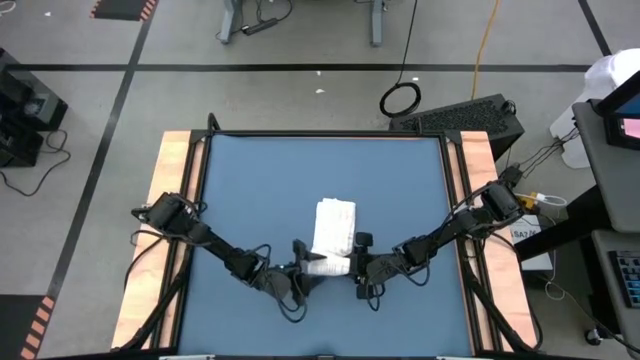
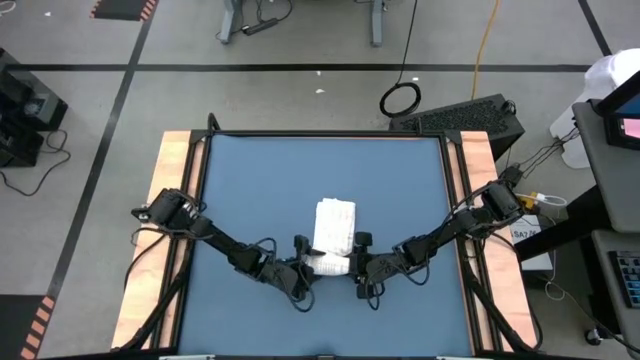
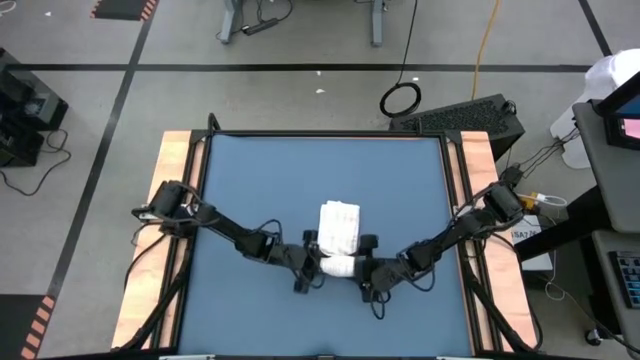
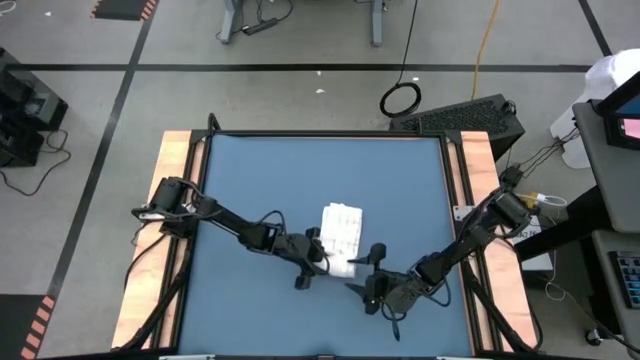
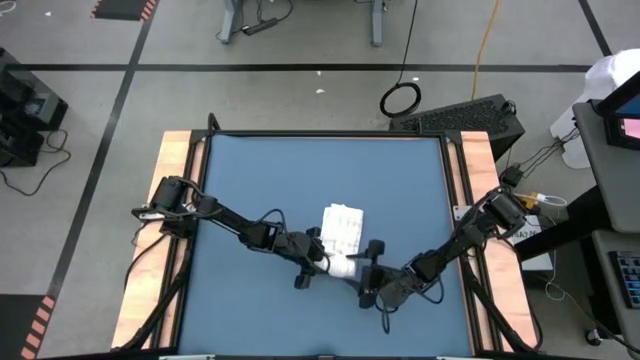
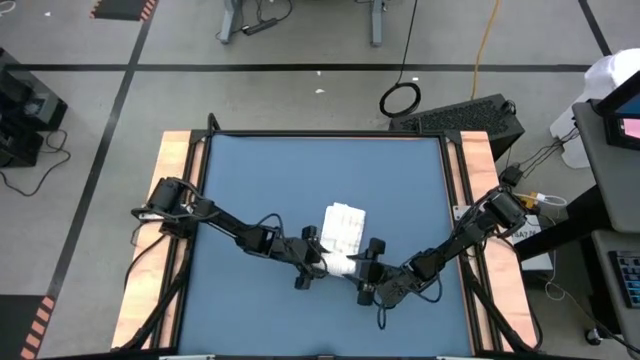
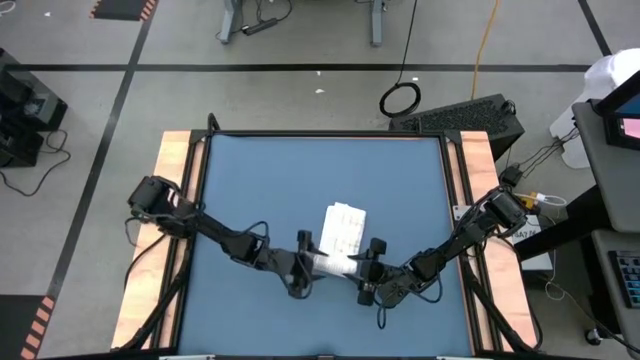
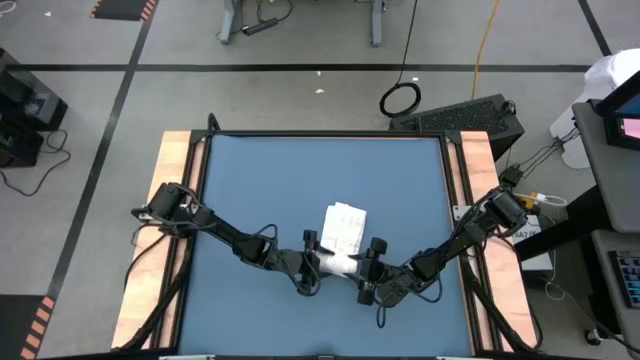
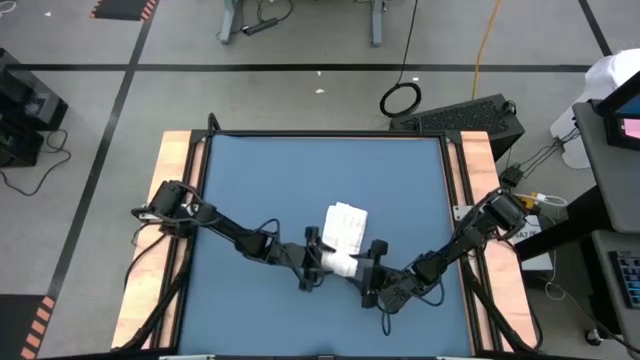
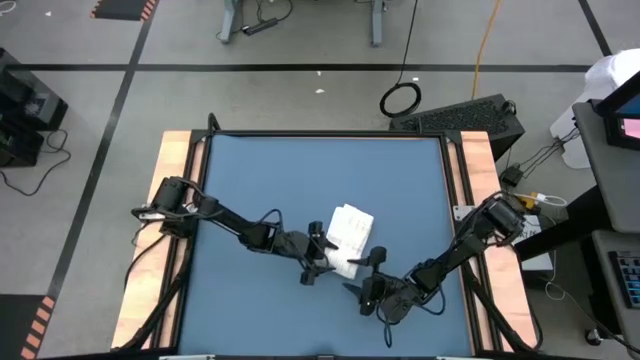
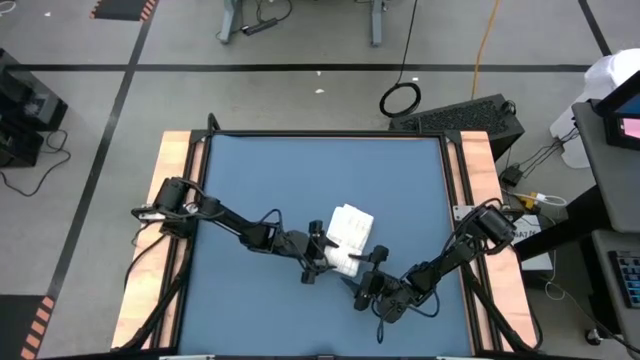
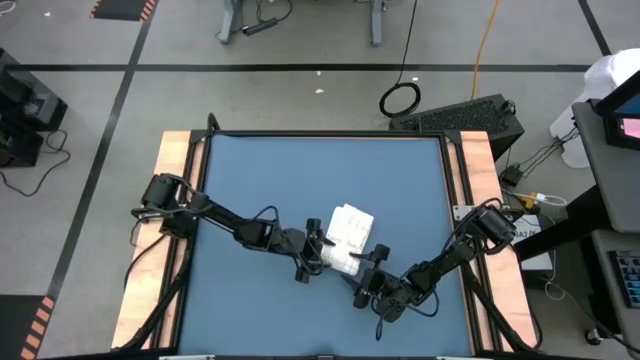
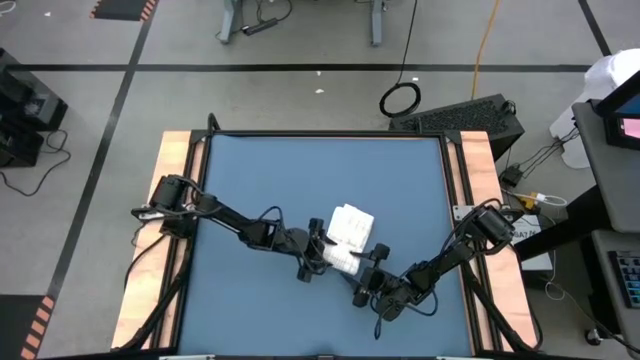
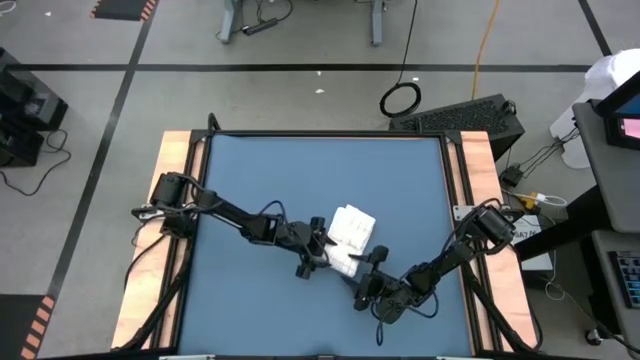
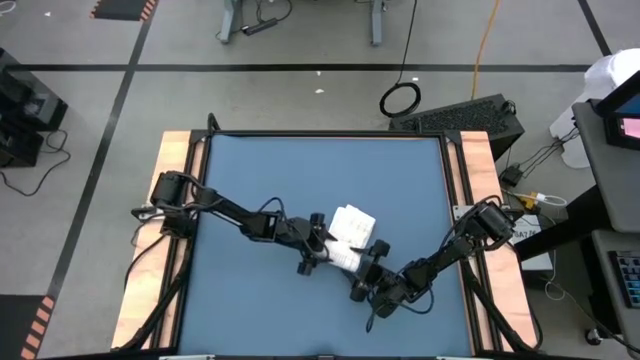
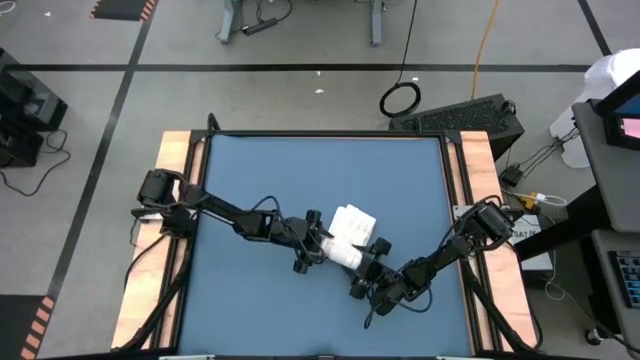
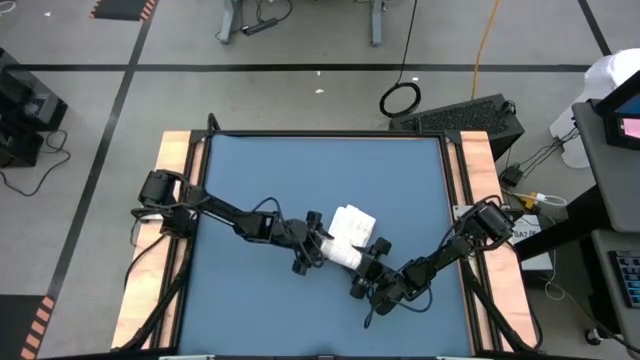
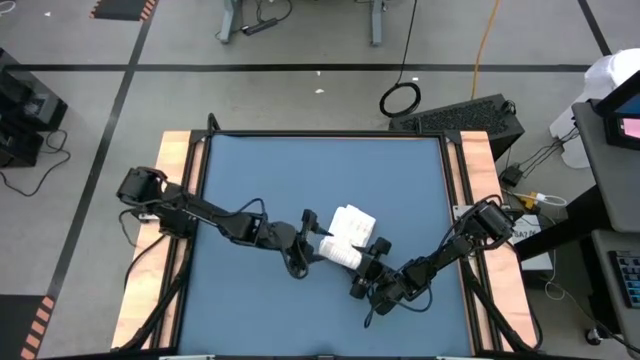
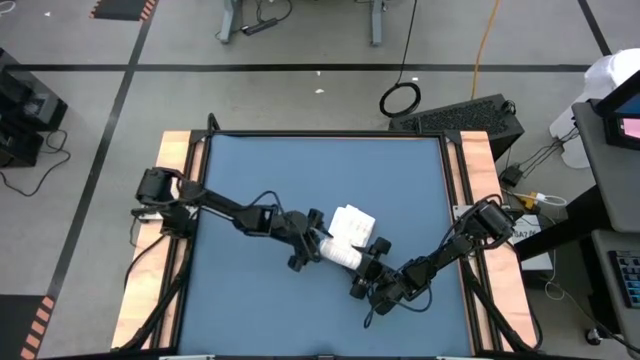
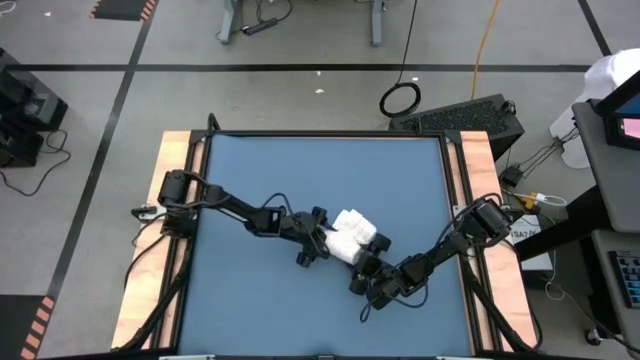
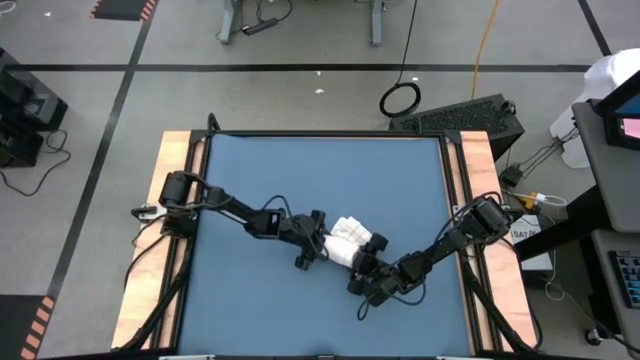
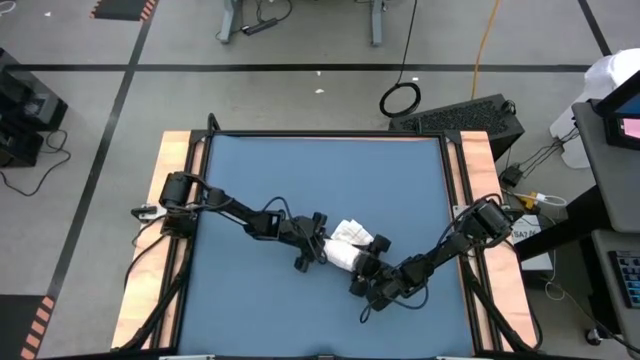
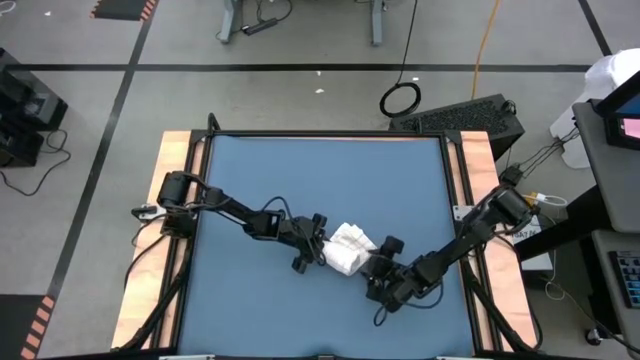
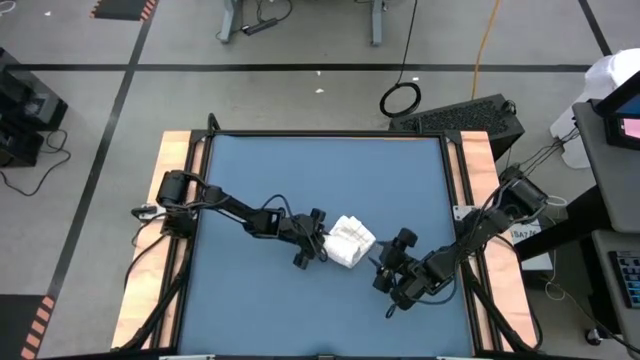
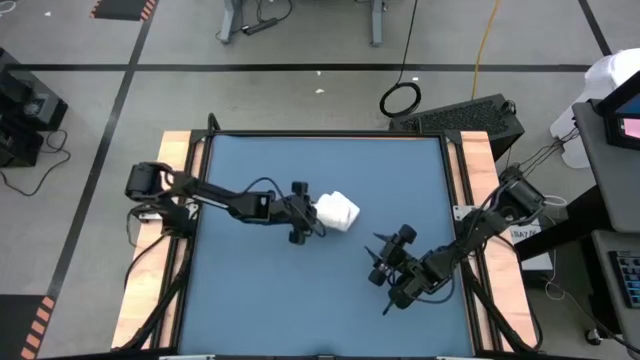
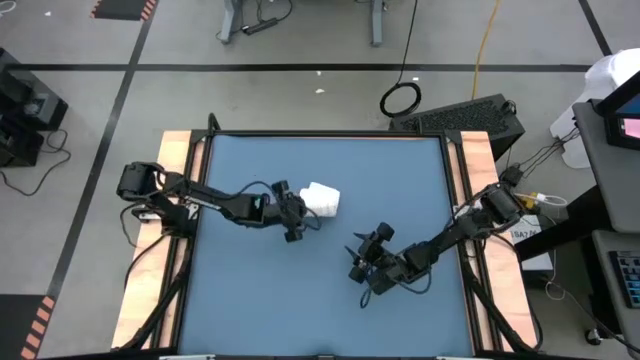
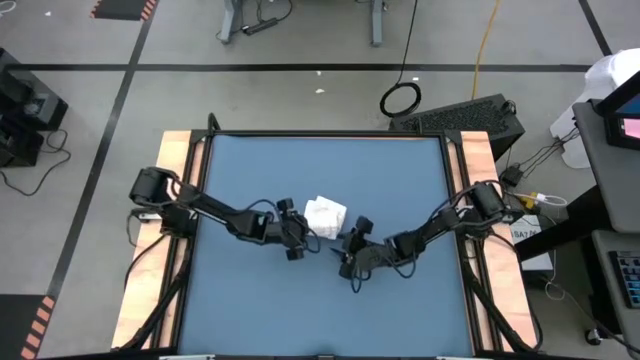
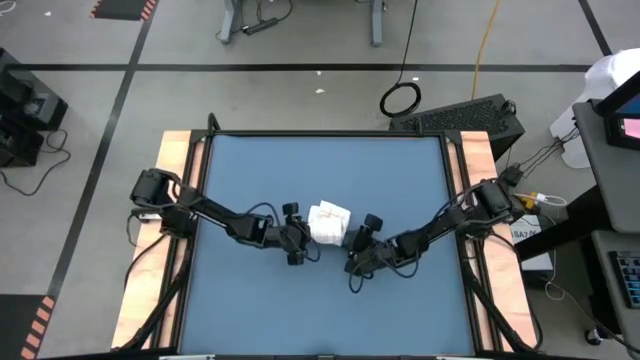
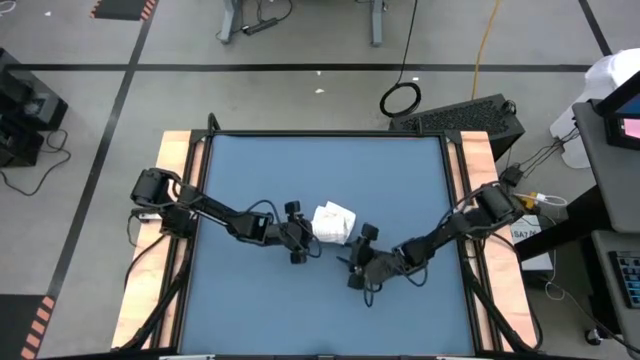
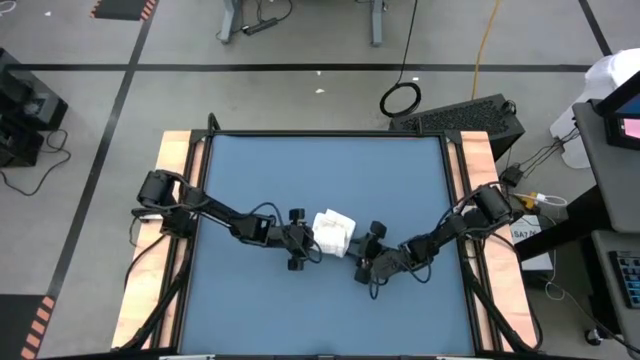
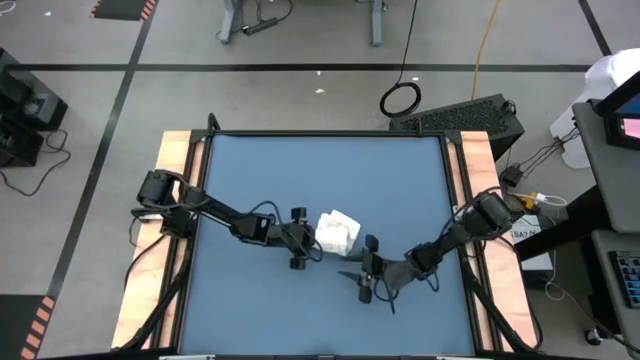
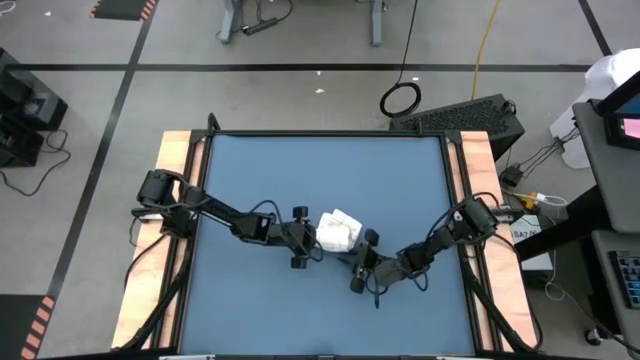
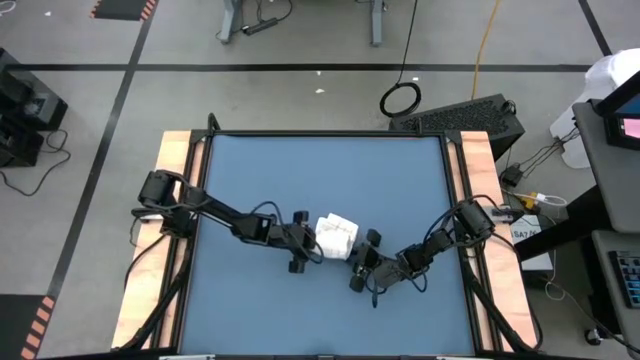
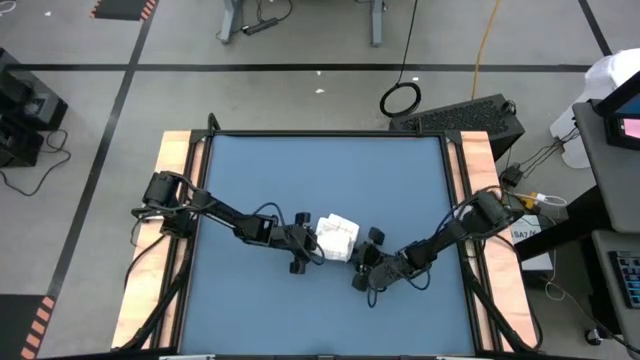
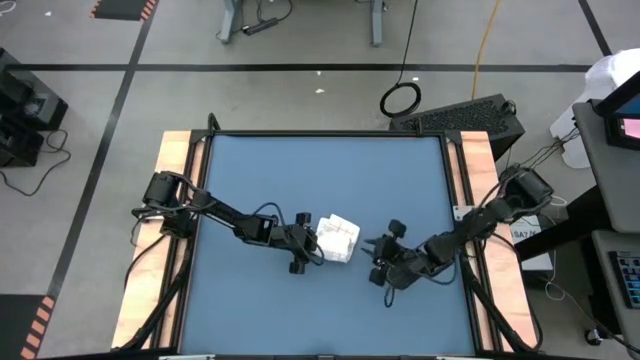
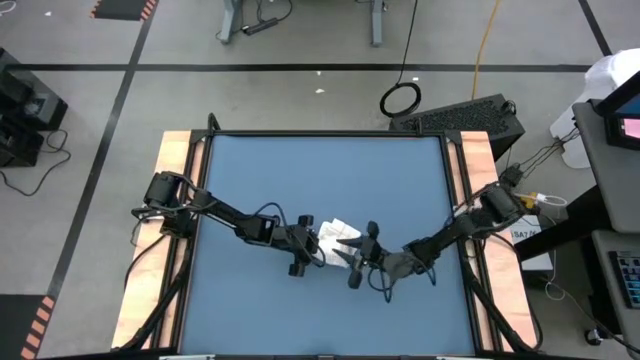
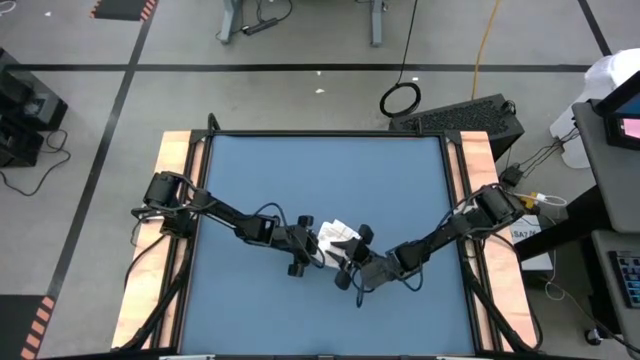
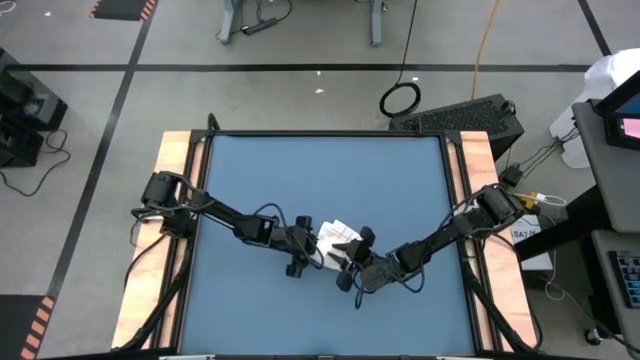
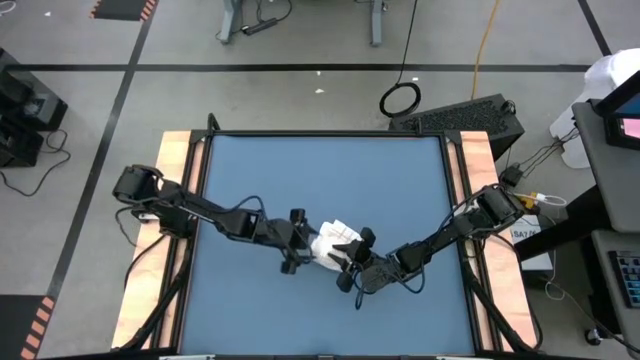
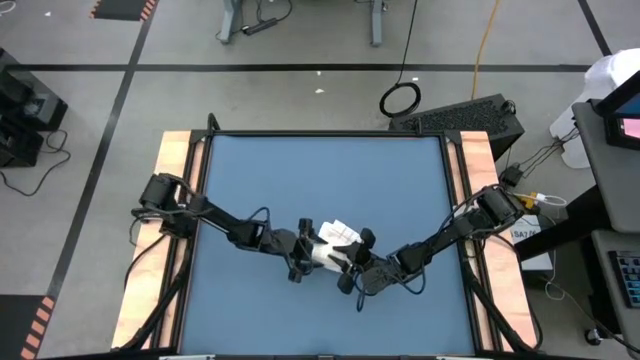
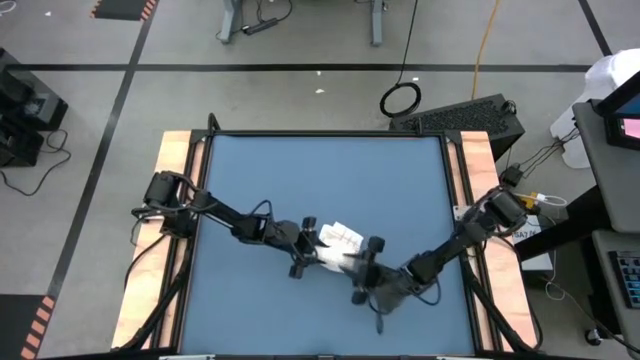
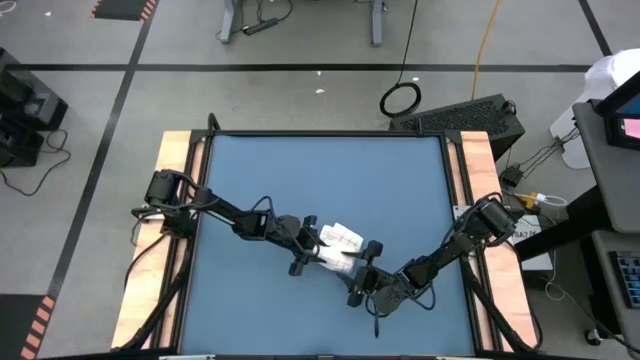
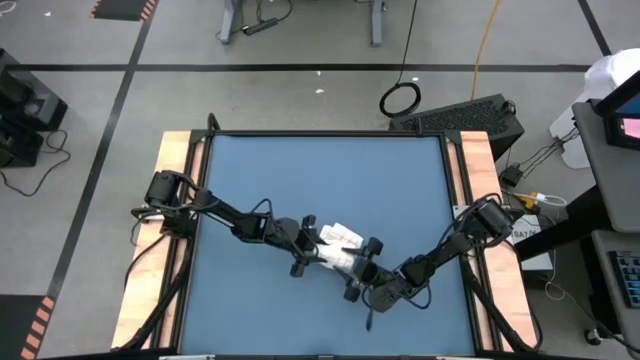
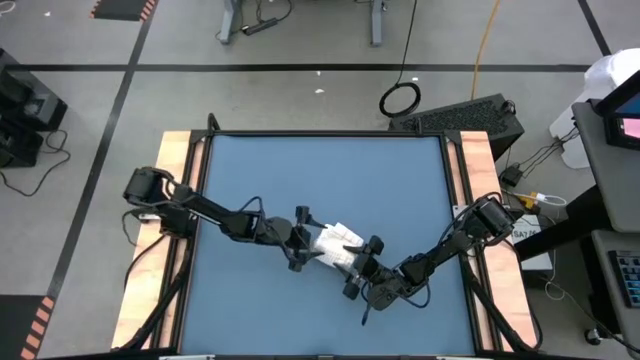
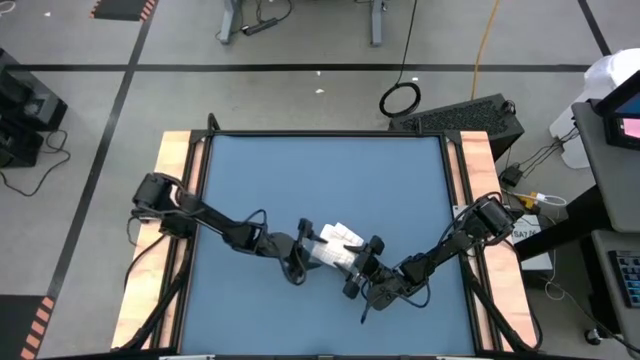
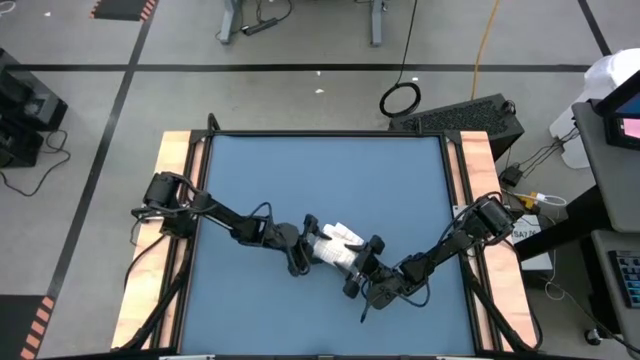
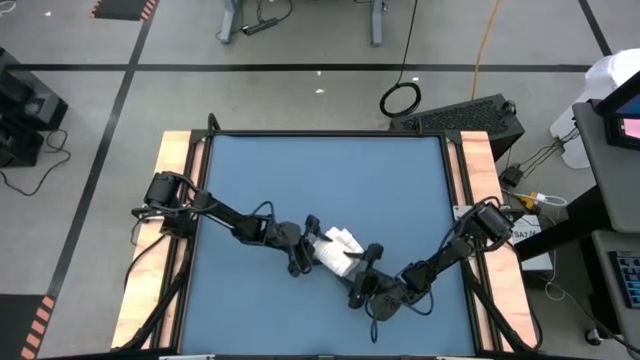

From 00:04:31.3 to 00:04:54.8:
Task: Roll towel into tight, uniform cylinder
Roll the white towel
